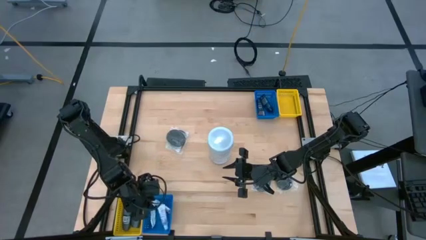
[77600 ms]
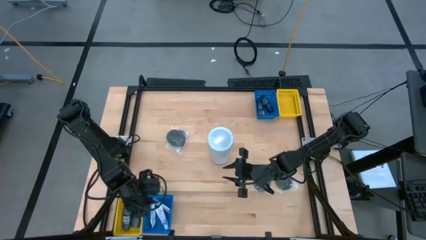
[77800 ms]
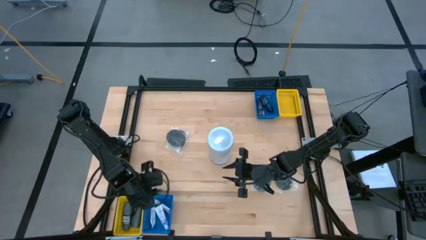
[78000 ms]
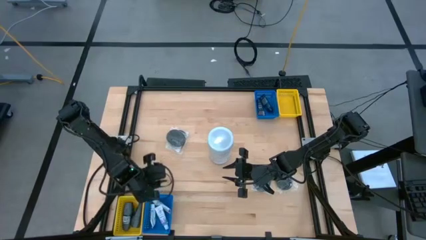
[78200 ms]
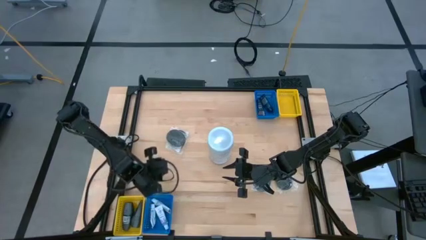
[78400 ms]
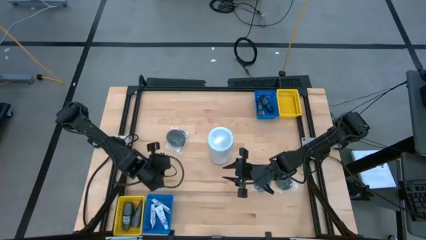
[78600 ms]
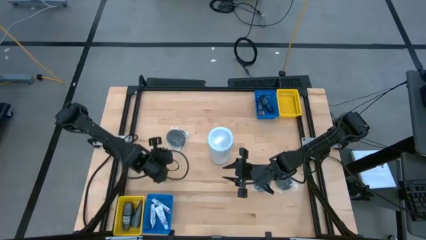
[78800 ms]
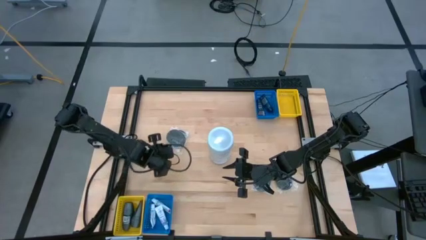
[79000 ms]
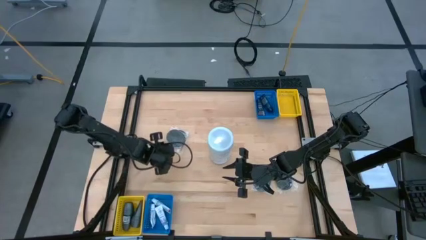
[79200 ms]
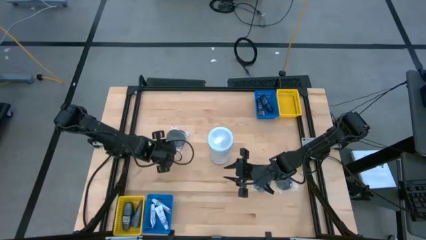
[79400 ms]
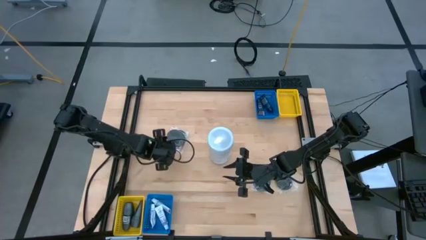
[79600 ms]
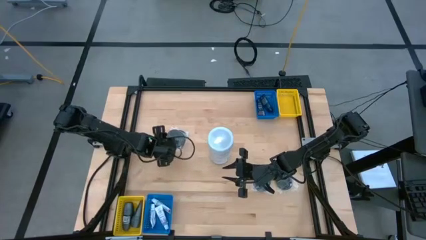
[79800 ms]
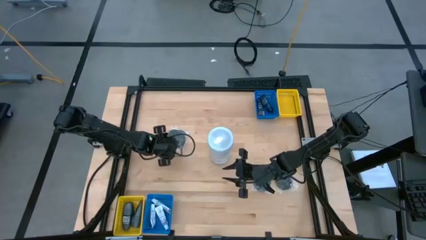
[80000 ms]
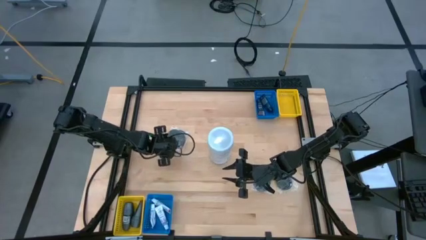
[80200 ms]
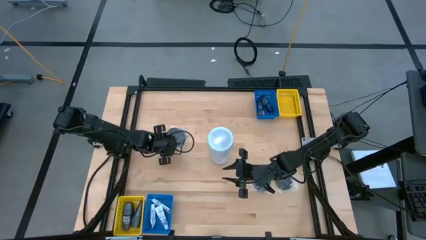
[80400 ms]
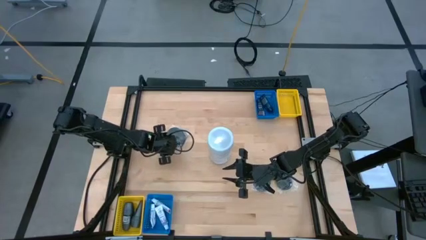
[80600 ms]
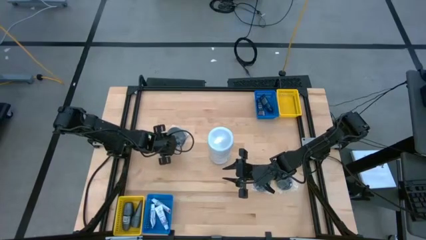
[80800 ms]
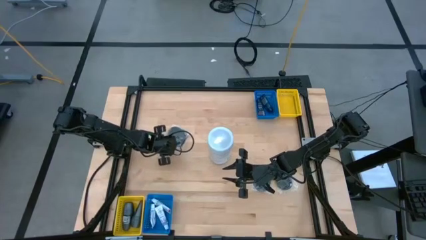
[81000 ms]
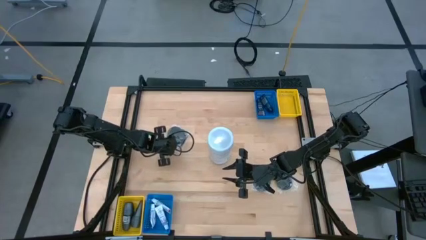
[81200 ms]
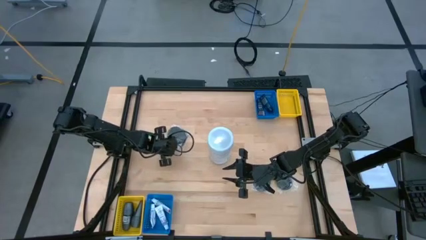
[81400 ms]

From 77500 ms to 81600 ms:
Task: Pick & Place Travel size toiletries
Put the black hairbrush into the top yellow bin

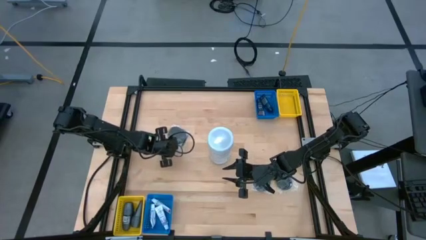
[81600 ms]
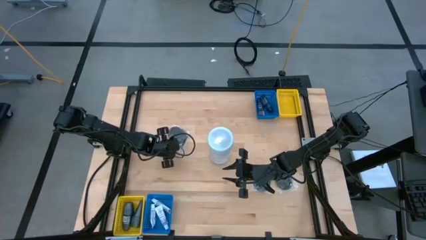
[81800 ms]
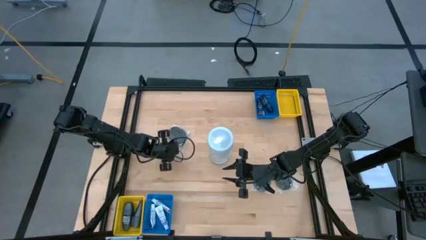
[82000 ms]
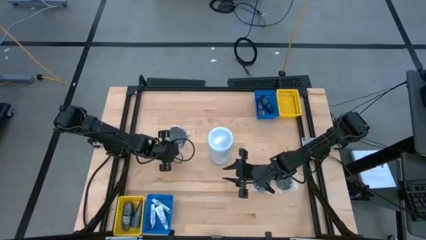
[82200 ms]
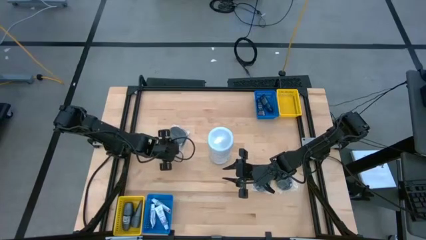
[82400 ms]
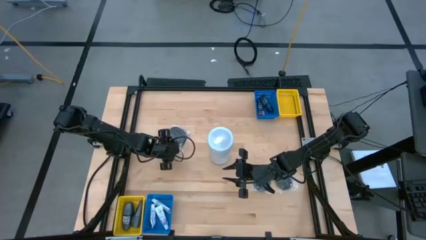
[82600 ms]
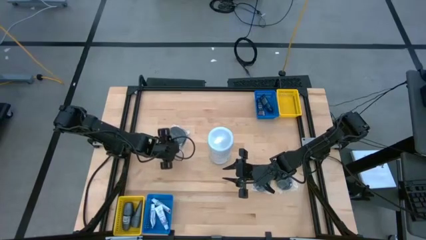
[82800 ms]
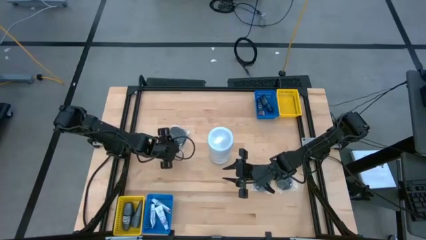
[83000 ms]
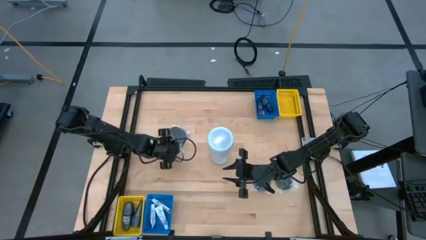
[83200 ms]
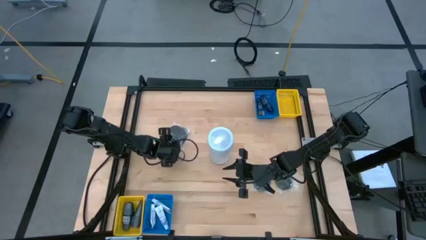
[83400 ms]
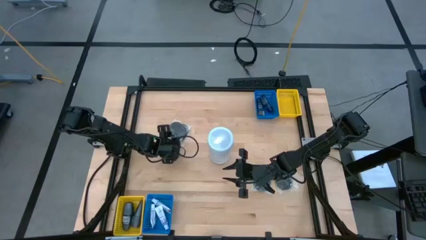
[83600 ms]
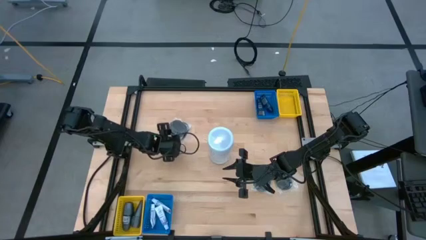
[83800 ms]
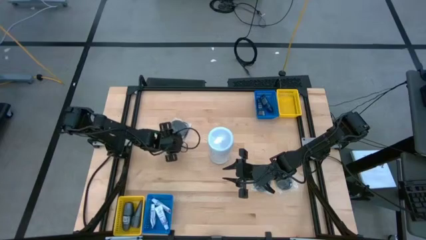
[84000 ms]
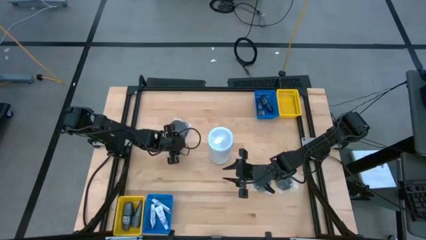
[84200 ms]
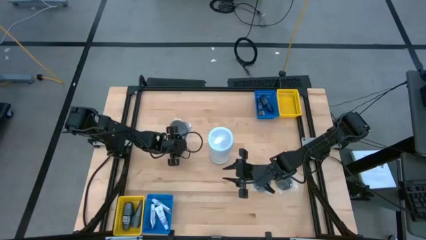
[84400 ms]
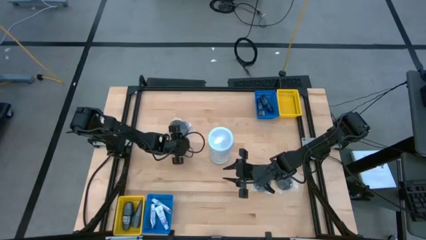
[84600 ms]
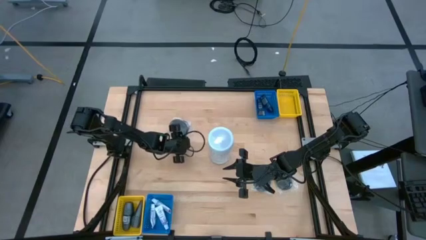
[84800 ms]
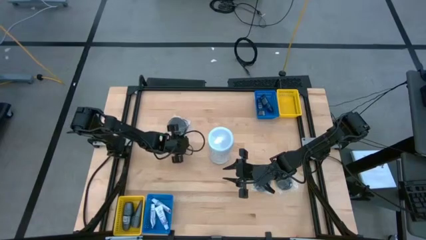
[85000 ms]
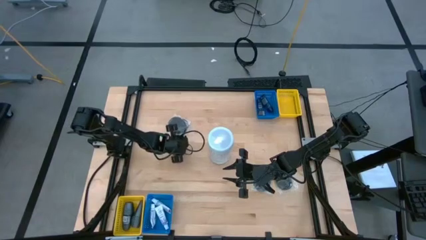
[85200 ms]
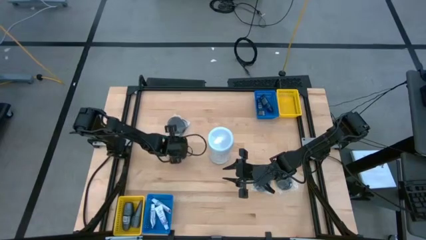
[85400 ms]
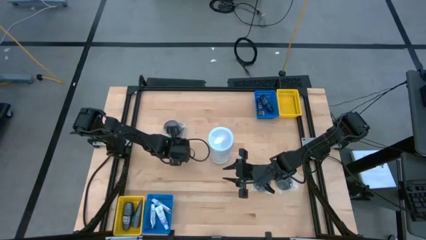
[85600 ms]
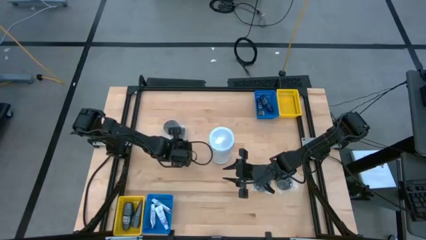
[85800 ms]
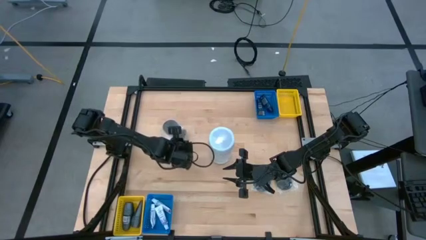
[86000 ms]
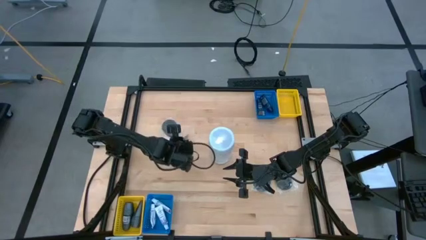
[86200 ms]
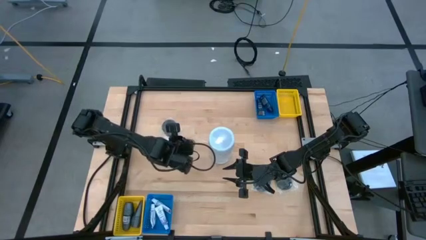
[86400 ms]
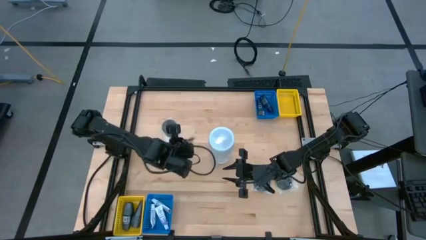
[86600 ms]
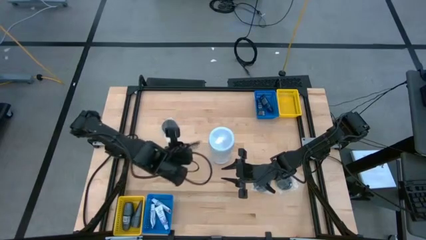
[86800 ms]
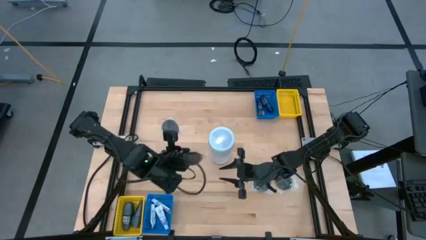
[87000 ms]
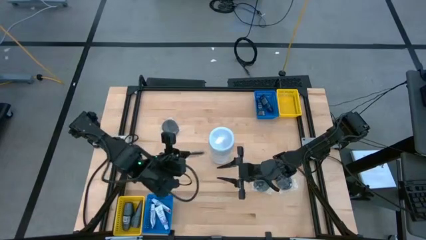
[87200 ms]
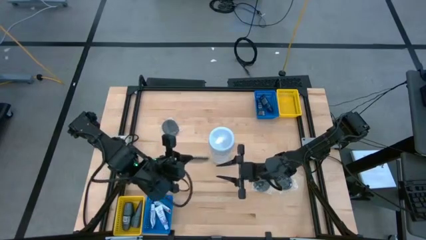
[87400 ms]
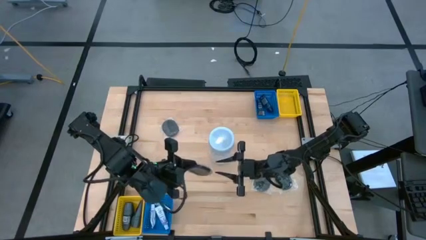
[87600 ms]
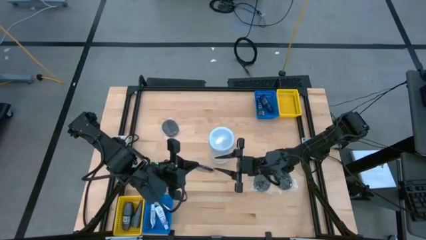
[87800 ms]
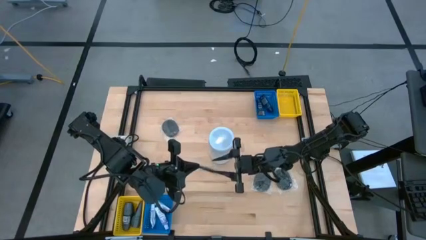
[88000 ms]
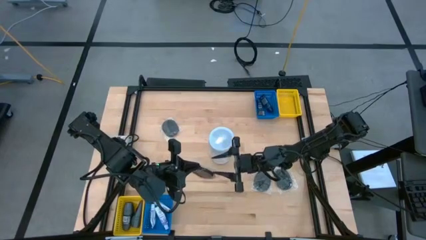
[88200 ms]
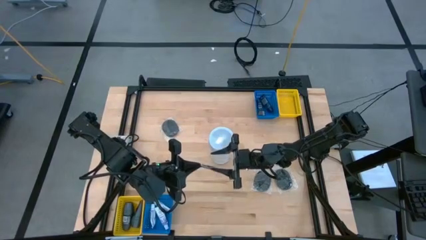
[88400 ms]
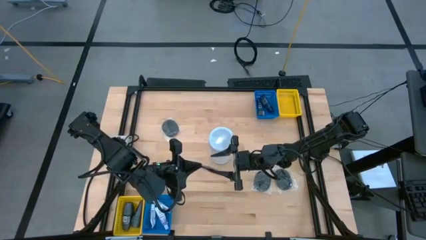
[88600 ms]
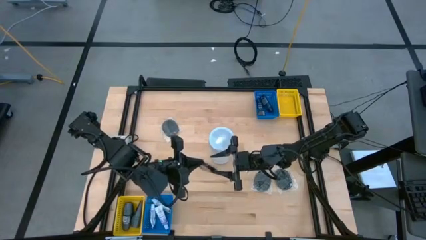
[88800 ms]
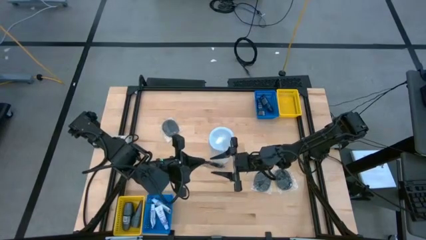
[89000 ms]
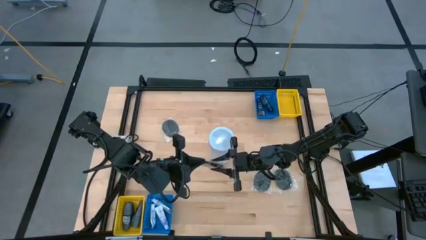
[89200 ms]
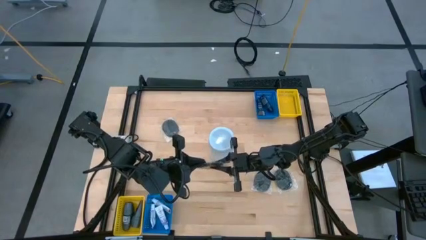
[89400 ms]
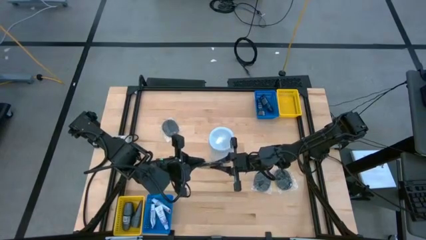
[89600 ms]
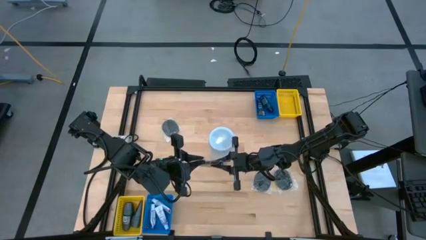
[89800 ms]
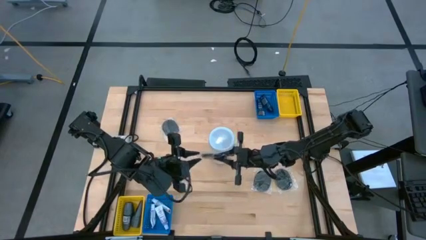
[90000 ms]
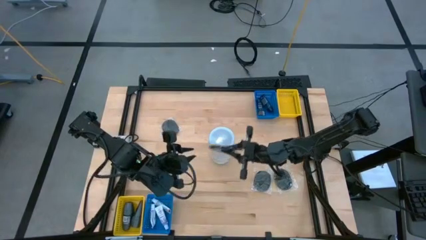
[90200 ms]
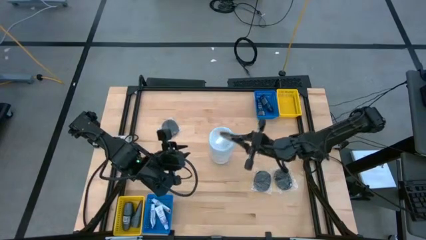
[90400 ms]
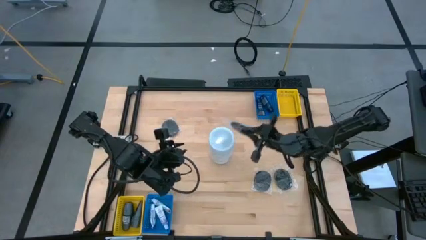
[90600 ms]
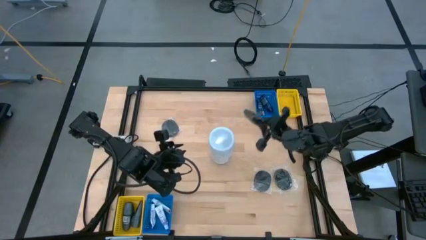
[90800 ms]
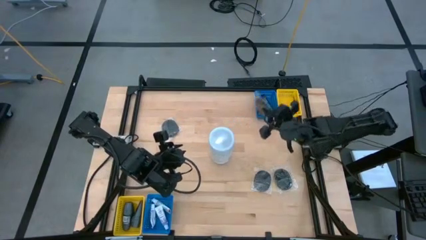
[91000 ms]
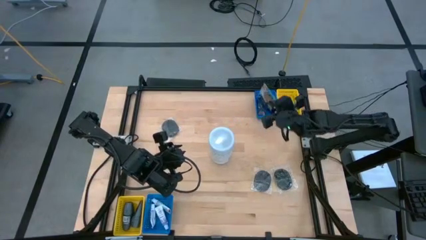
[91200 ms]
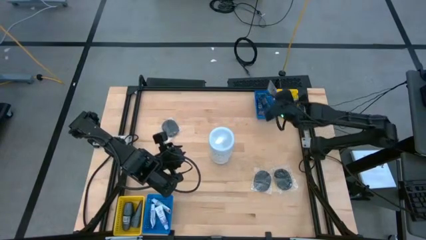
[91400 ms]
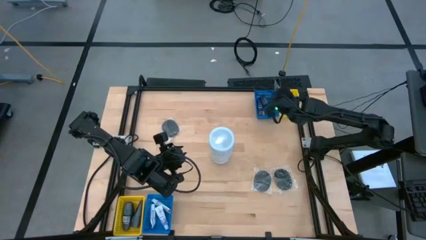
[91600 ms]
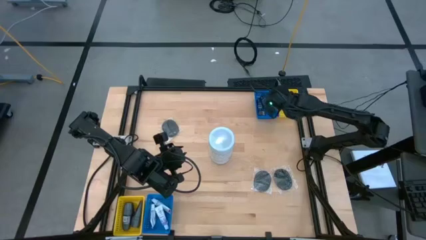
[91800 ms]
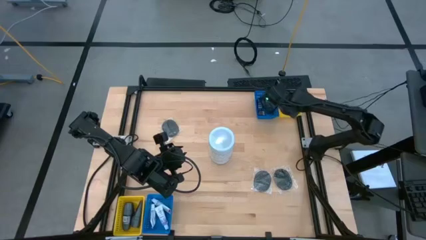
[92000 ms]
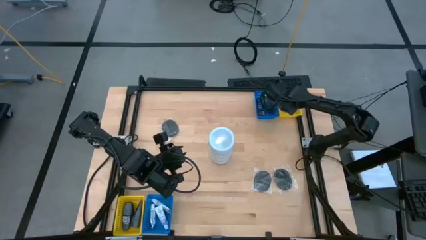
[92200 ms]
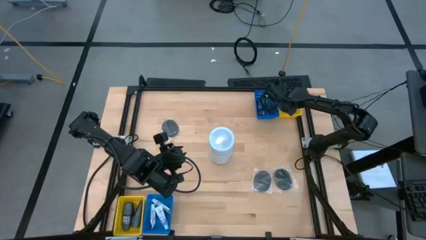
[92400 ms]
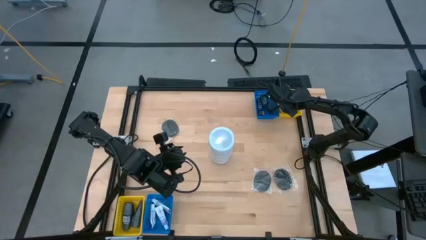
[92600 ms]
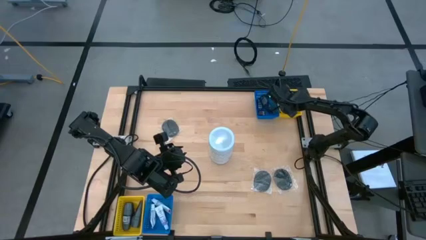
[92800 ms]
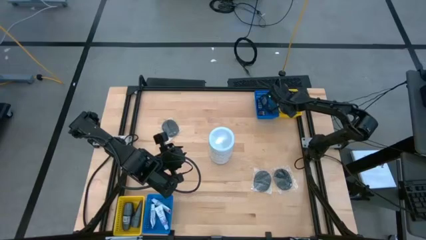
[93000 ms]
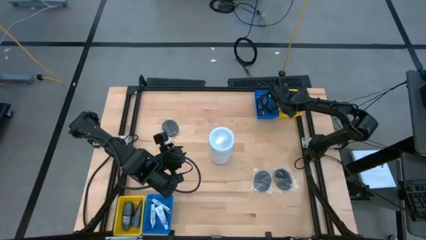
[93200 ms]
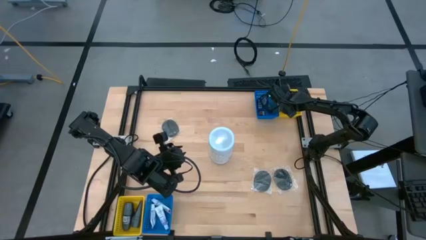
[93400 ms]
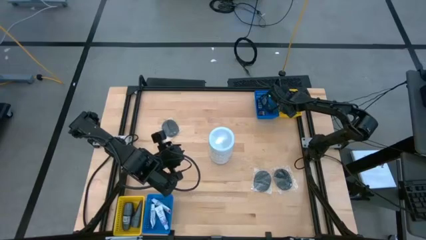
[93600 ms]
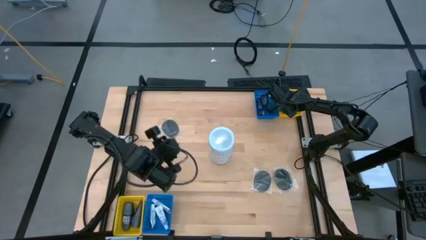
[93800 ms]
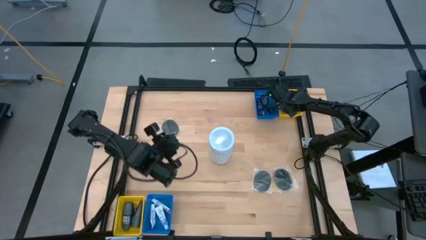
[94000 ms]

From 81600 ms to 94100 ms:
Put the black hairbrush into the top yellow bin

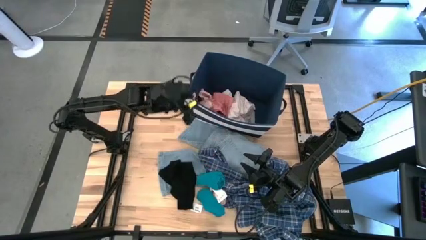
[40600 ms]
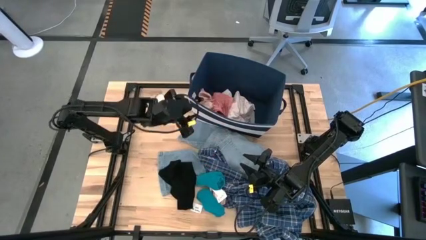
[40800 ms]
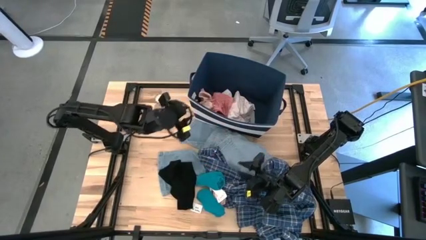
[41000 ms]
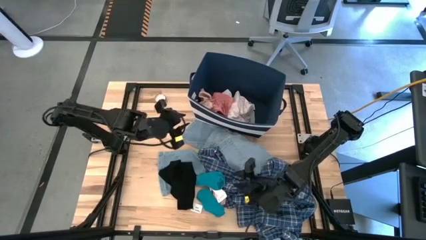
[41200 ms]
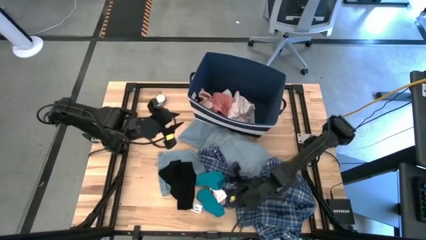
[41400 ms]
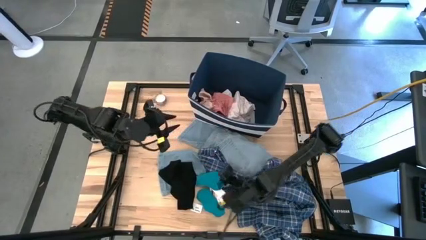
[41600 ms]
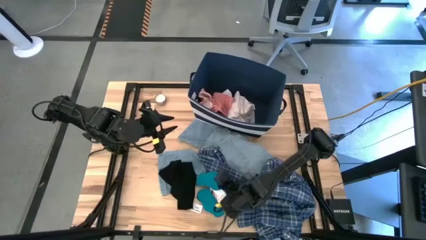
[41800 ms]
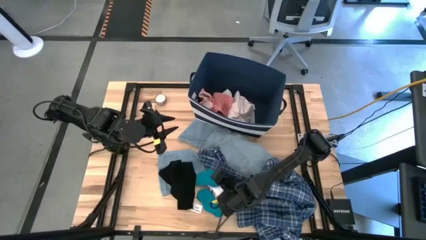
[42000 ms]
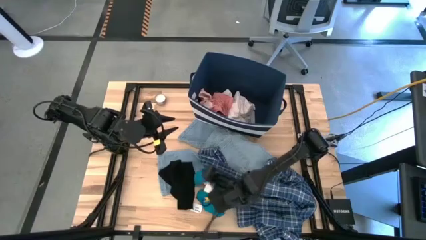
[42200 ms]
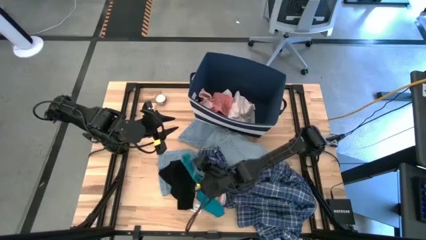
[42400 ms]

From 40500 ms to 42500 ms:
Task: Sort clothes
Adjust the blue sock
